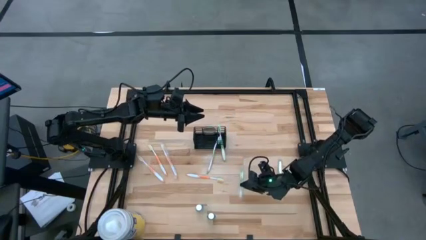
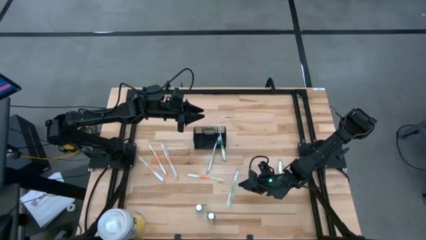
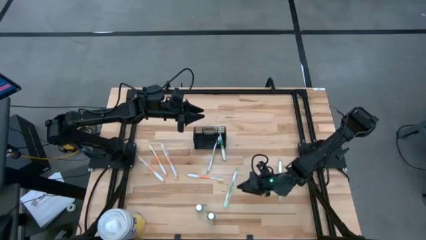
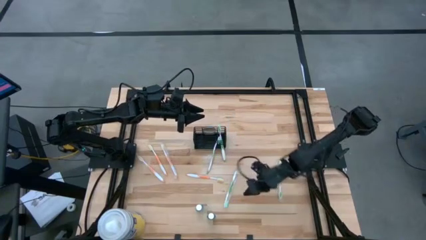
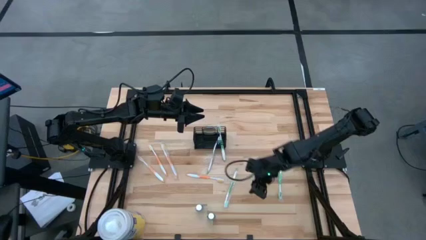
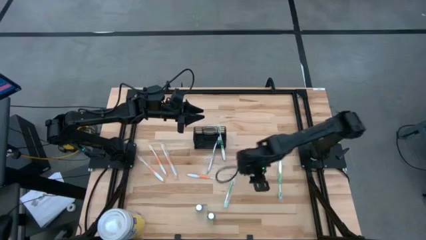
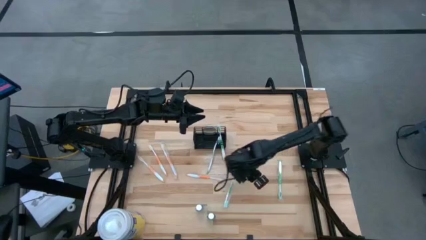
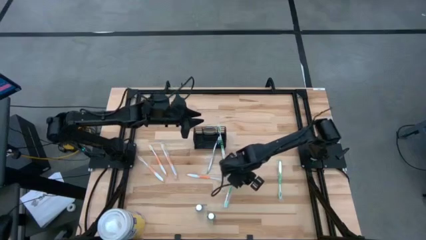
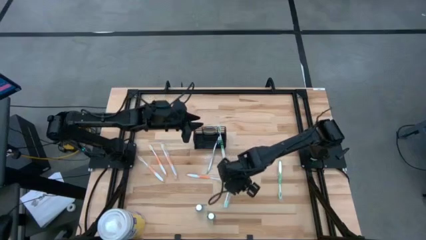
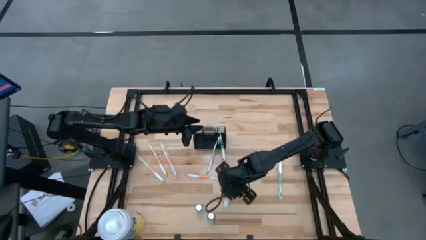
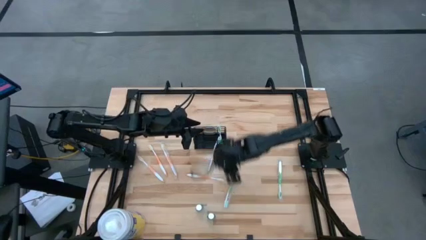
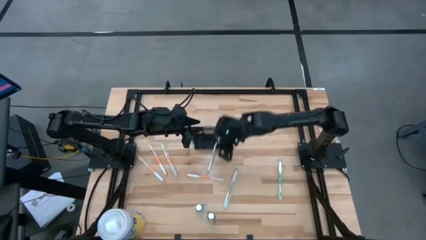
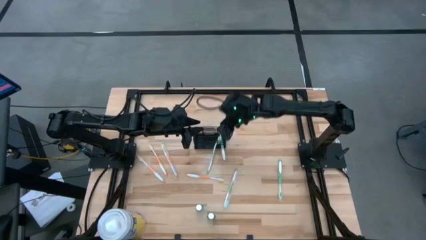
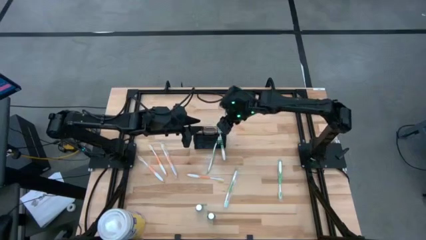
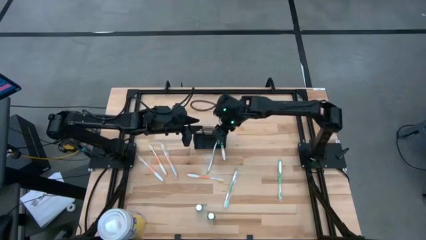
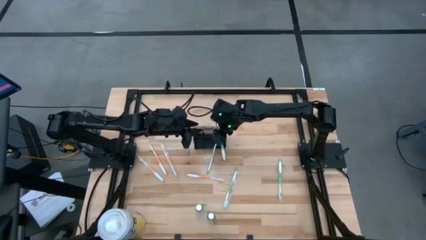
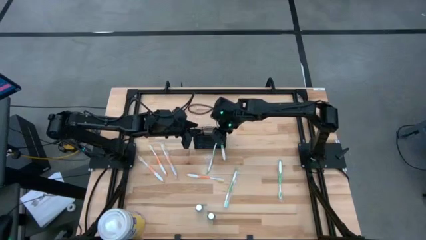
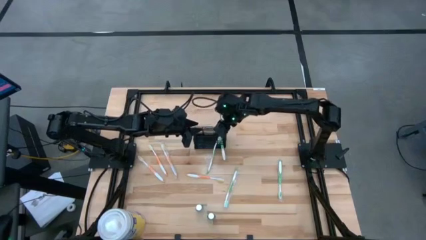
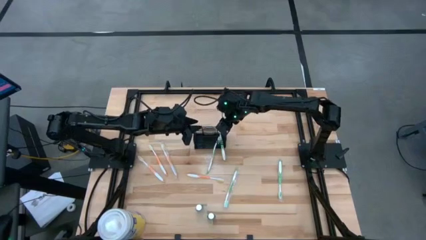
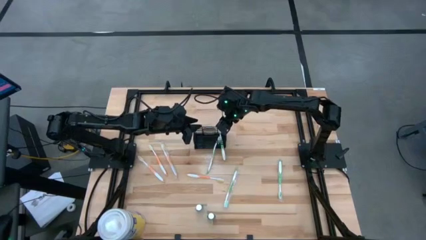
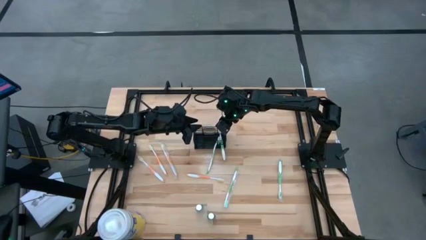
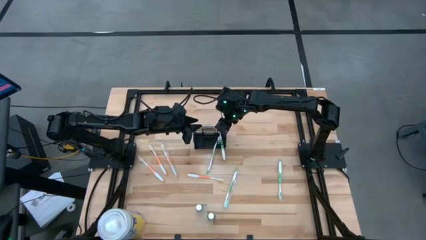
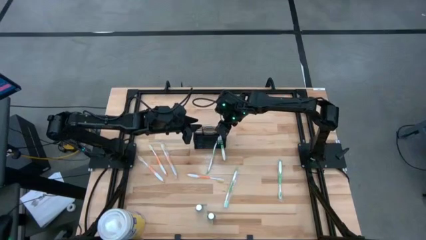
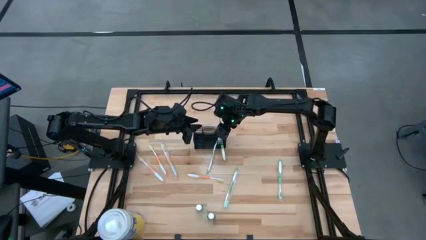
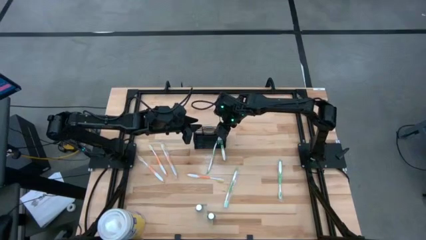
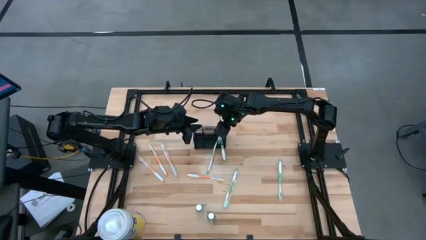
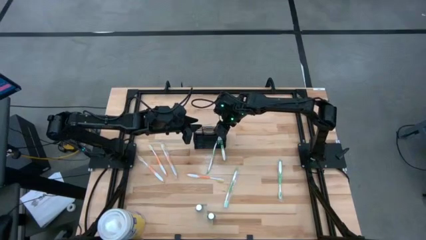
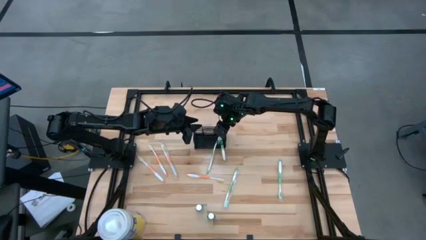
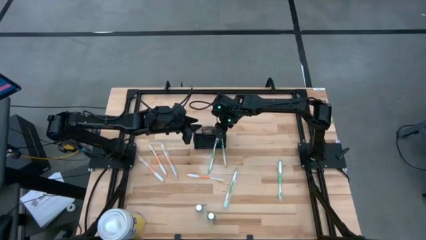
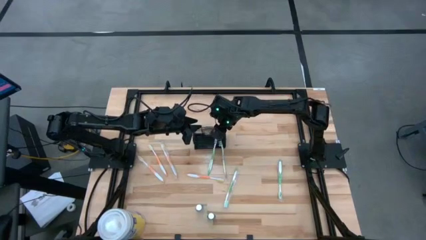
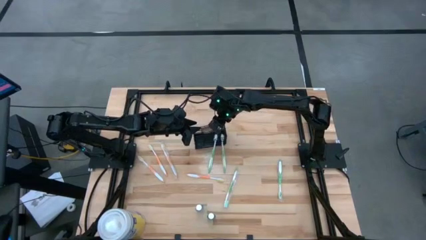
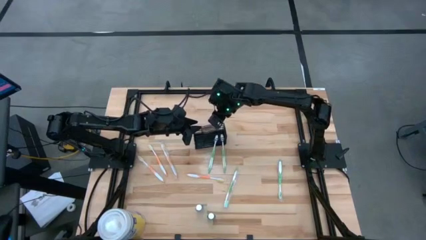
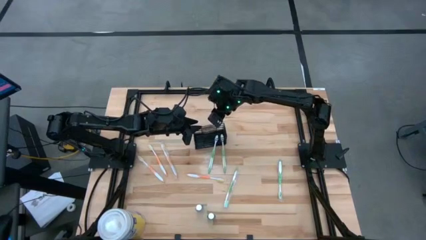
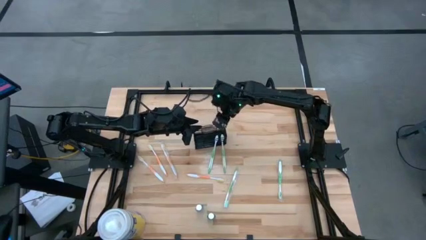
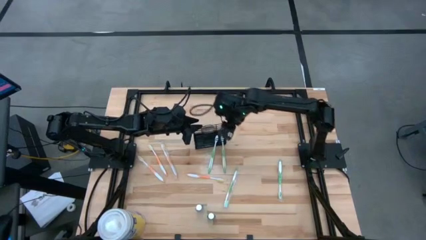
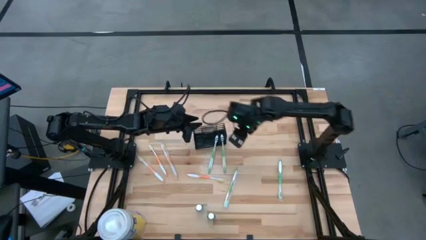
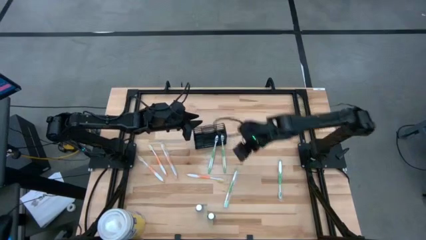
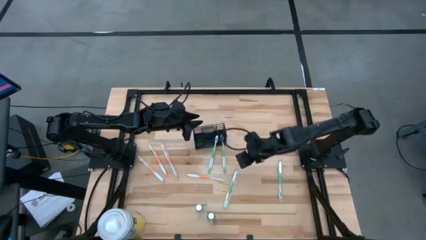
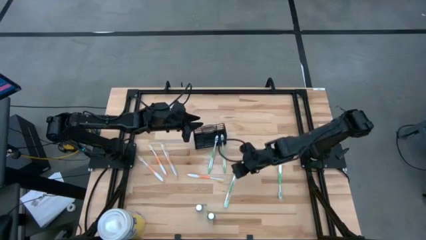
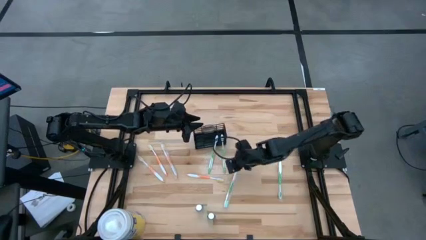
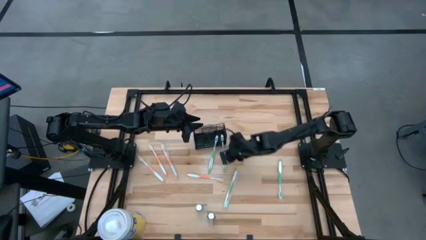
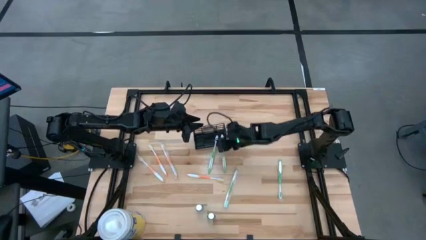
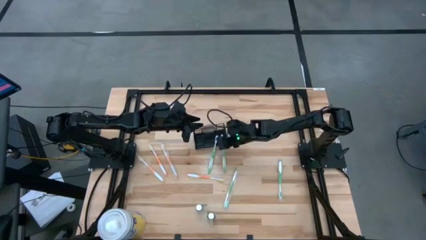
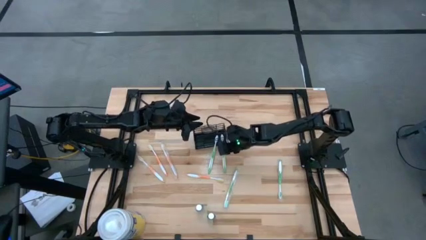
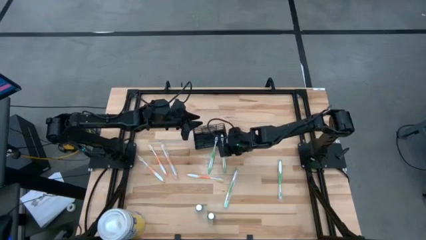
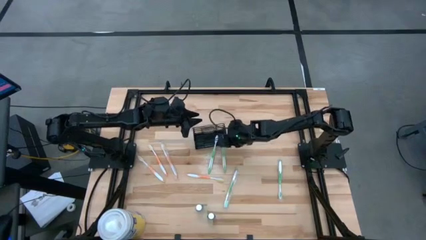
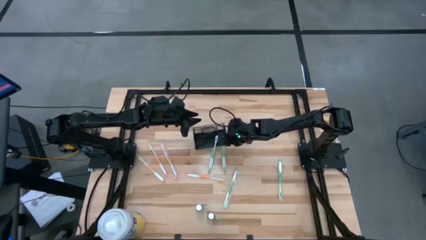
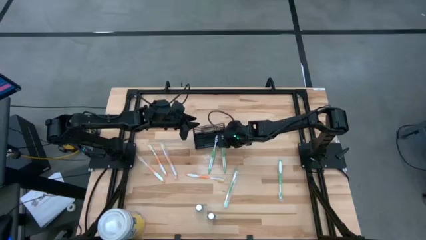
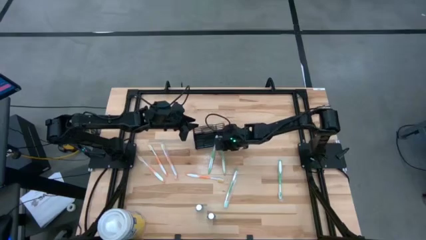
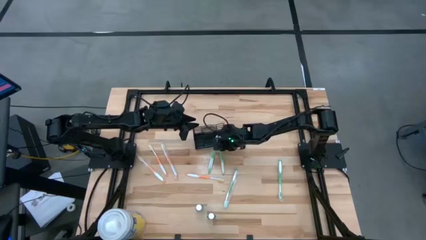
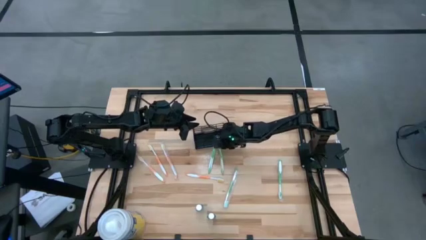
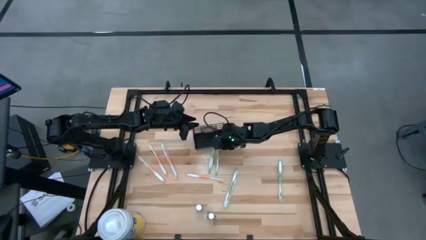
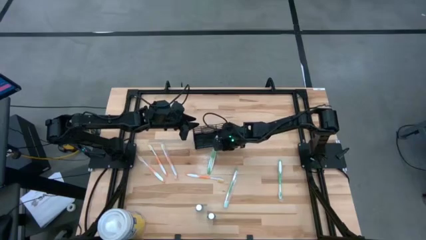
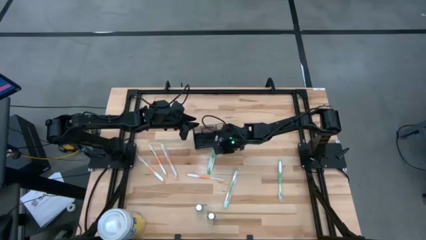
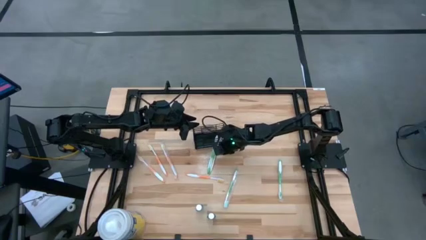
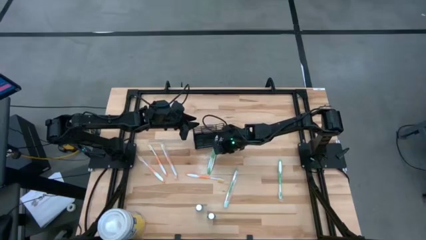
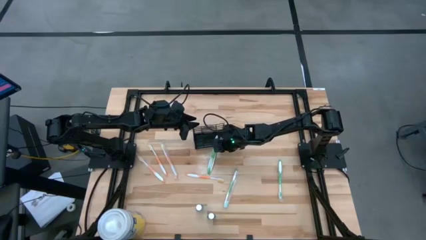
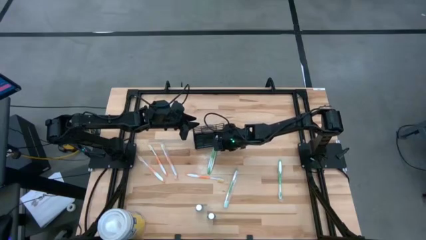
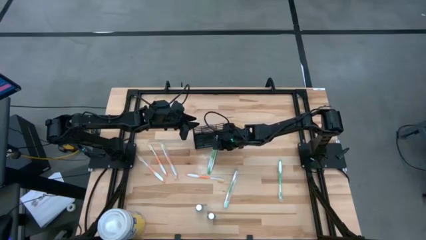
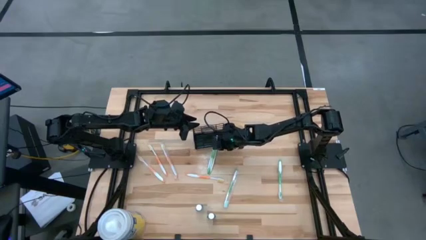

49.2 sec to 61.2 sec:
Task: Pick & Place toothbrushing station
Remove the green toothbrush from the wire organizer
